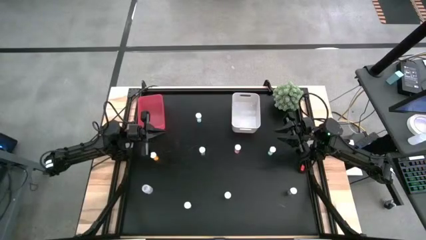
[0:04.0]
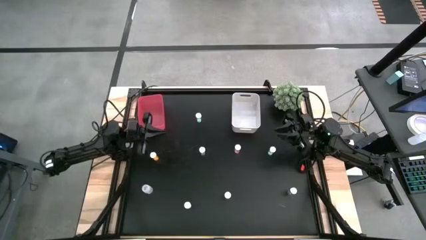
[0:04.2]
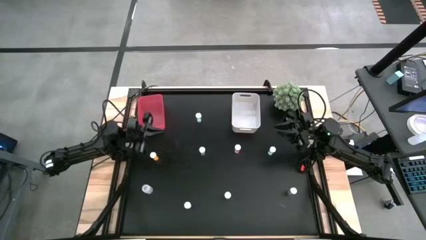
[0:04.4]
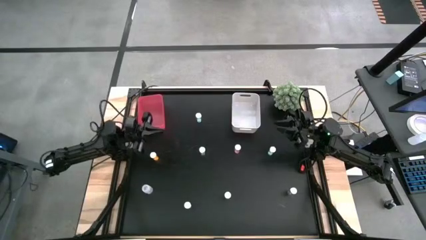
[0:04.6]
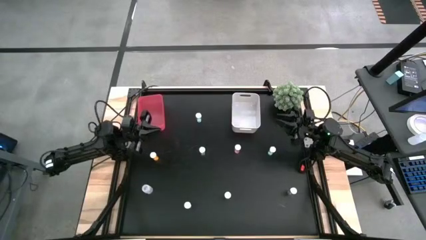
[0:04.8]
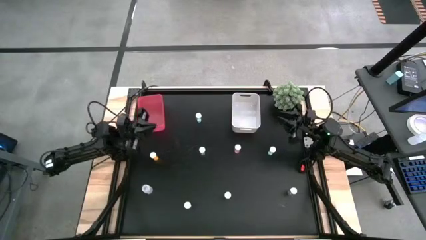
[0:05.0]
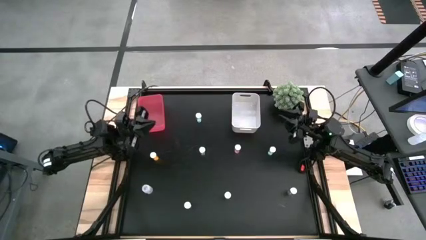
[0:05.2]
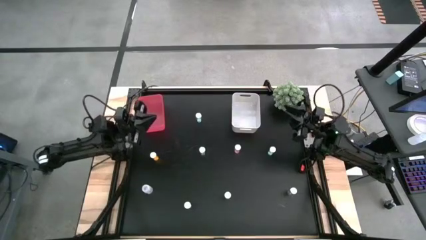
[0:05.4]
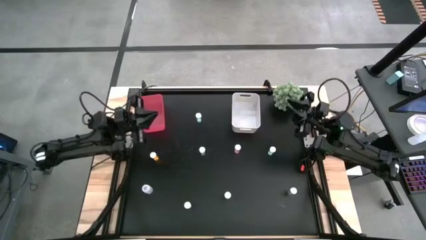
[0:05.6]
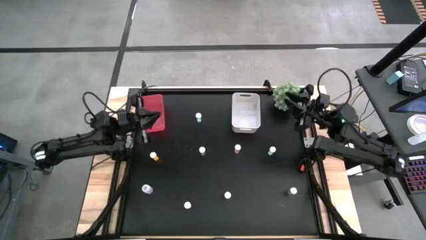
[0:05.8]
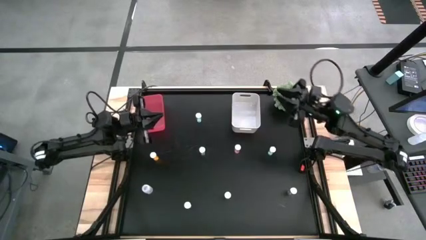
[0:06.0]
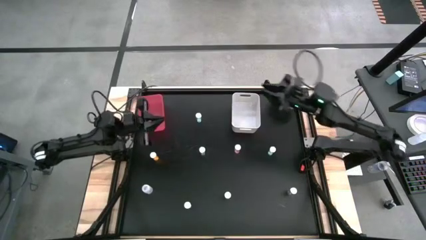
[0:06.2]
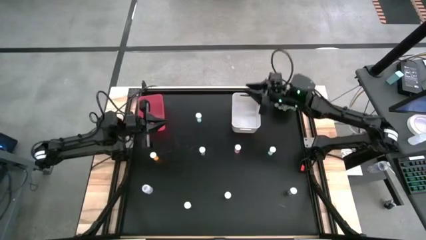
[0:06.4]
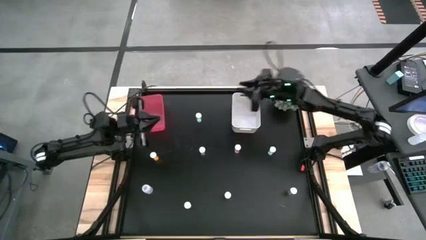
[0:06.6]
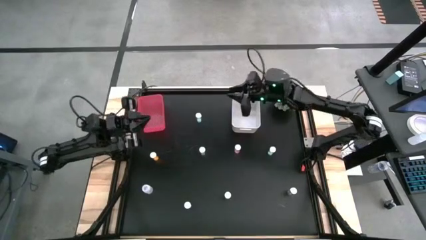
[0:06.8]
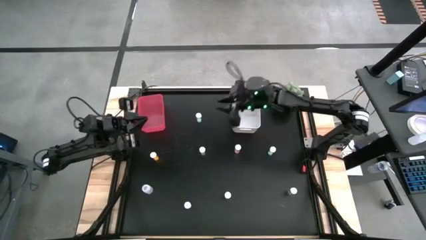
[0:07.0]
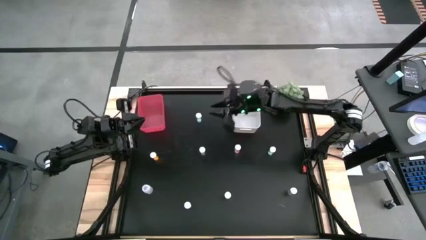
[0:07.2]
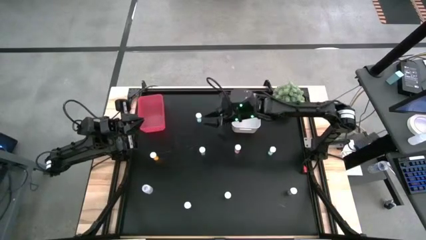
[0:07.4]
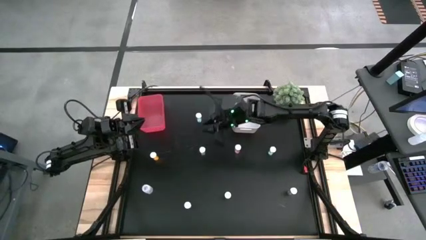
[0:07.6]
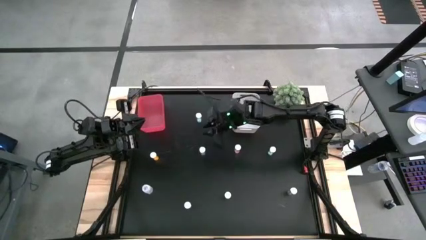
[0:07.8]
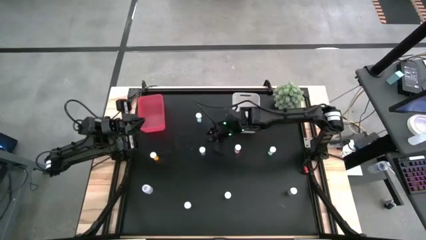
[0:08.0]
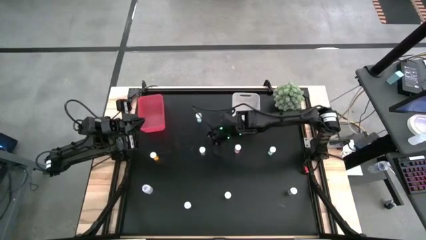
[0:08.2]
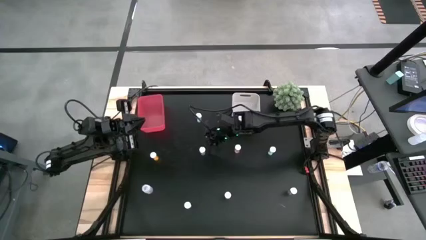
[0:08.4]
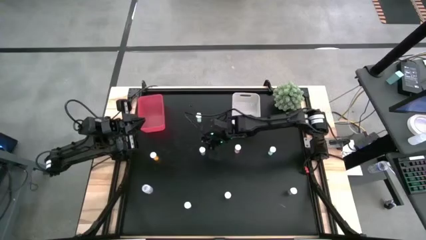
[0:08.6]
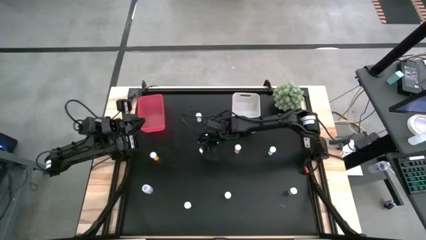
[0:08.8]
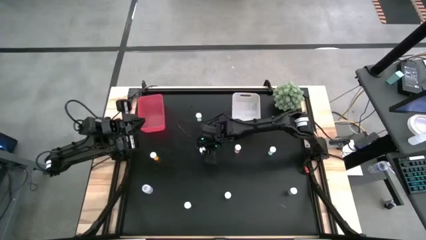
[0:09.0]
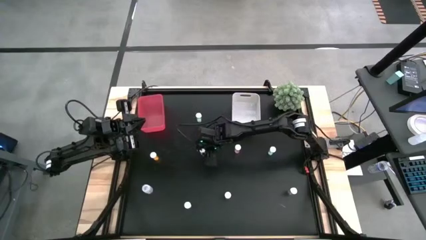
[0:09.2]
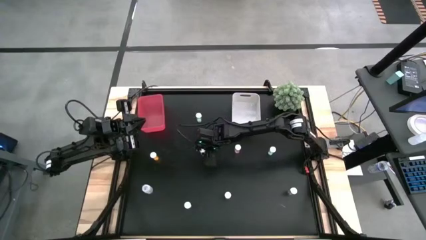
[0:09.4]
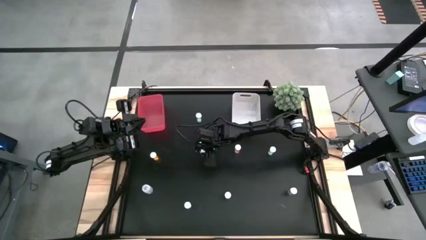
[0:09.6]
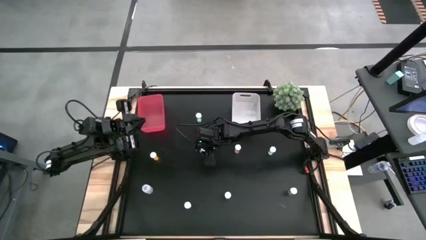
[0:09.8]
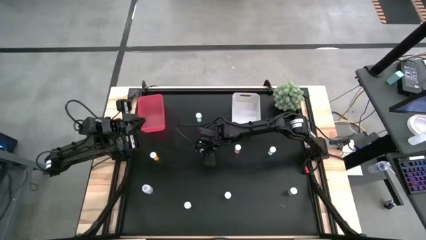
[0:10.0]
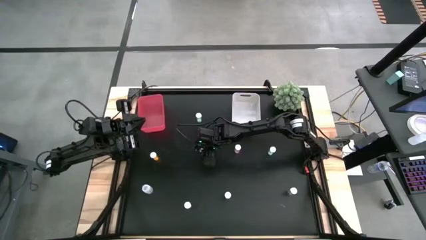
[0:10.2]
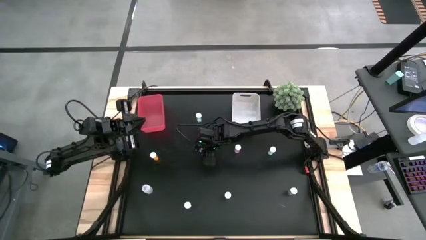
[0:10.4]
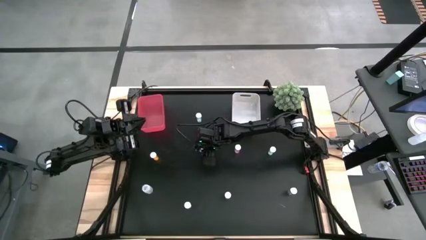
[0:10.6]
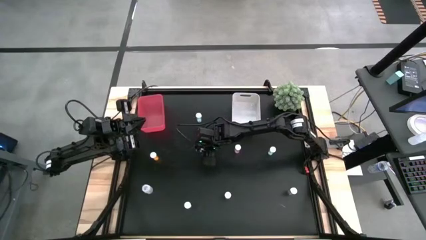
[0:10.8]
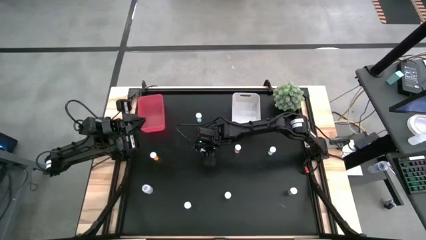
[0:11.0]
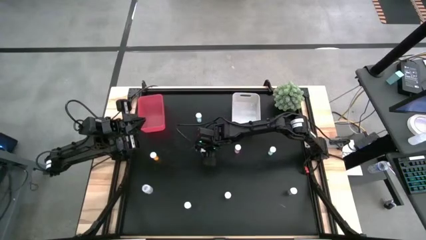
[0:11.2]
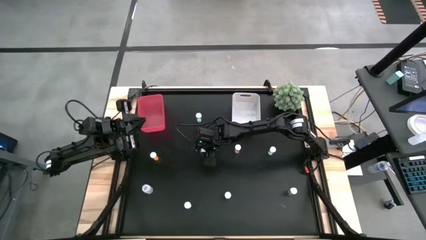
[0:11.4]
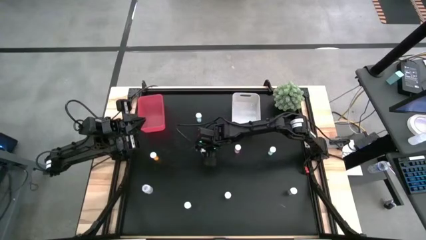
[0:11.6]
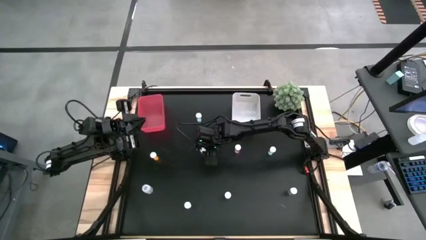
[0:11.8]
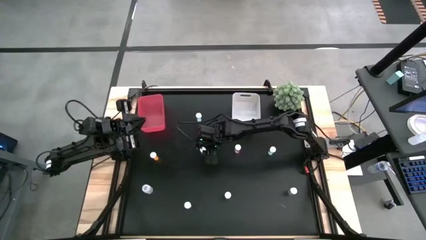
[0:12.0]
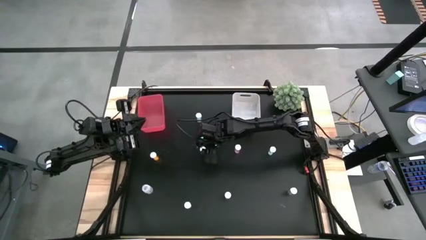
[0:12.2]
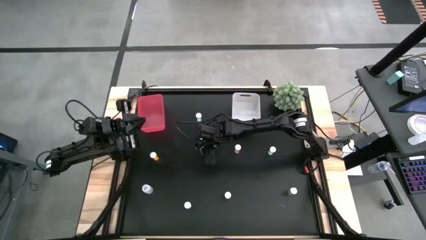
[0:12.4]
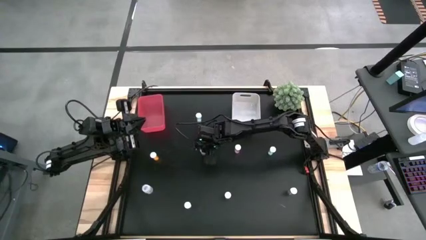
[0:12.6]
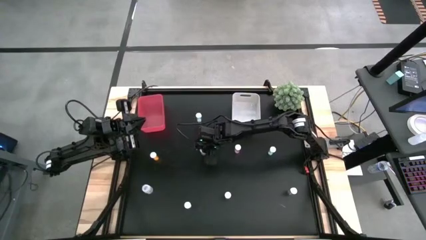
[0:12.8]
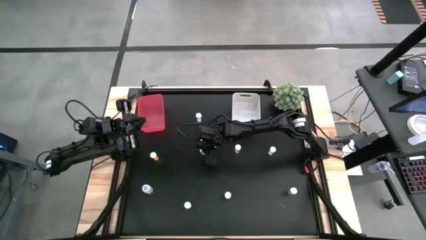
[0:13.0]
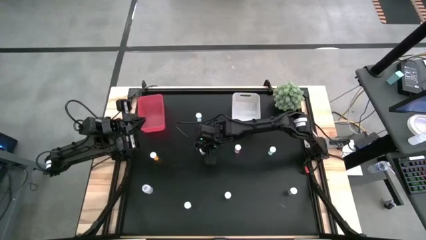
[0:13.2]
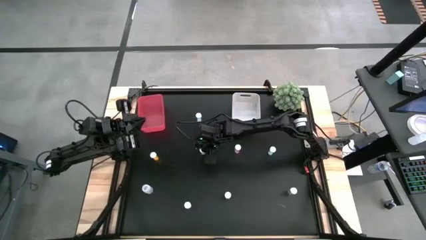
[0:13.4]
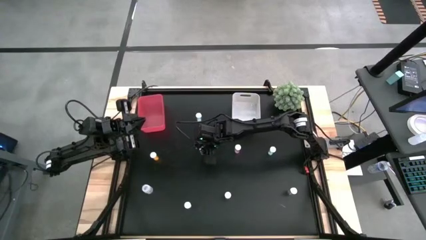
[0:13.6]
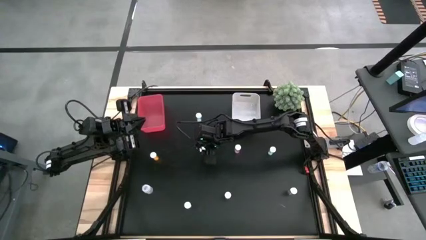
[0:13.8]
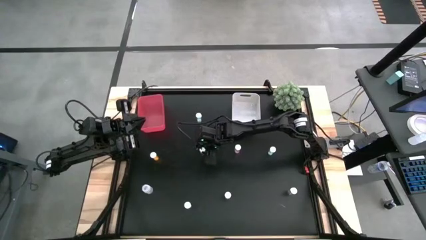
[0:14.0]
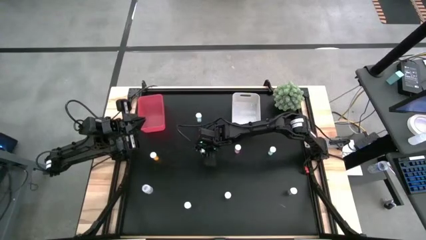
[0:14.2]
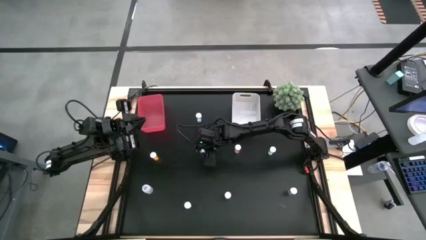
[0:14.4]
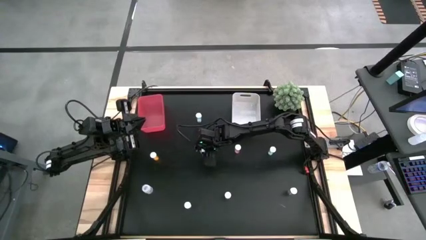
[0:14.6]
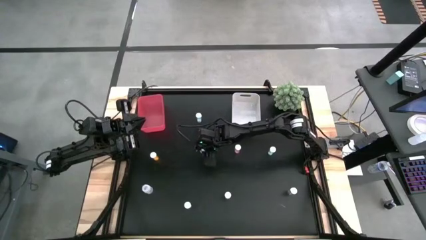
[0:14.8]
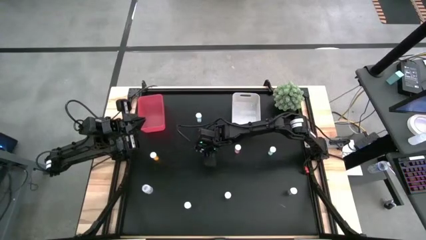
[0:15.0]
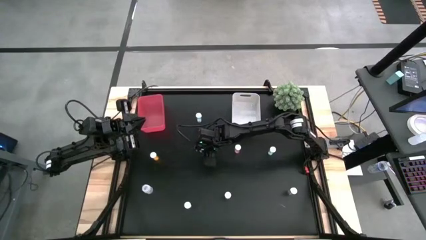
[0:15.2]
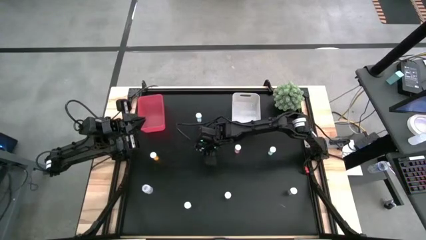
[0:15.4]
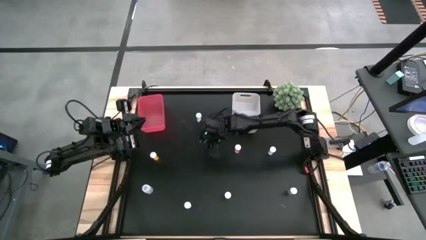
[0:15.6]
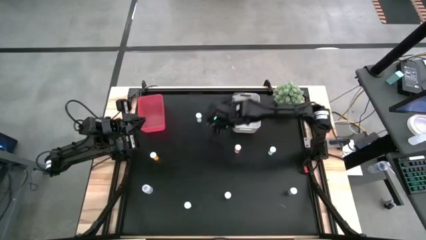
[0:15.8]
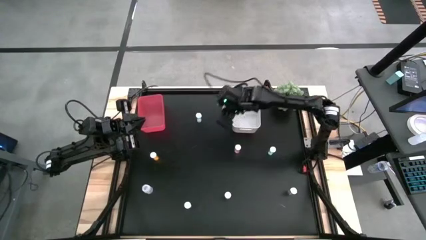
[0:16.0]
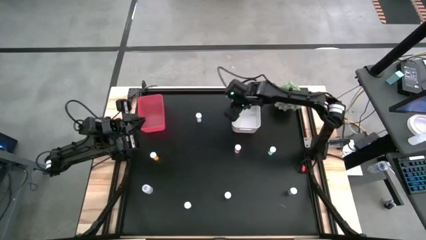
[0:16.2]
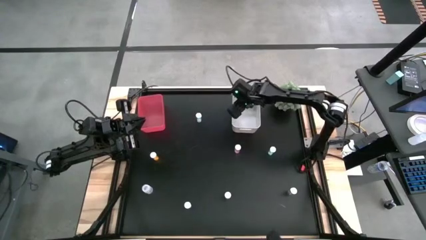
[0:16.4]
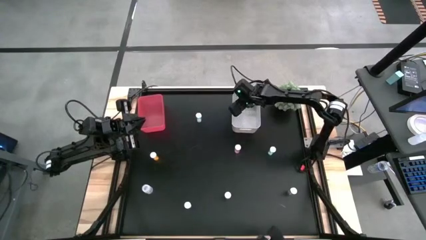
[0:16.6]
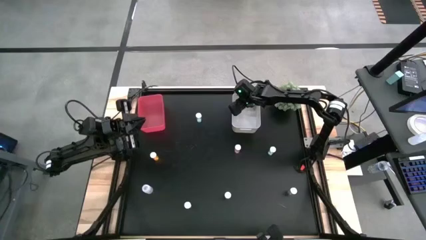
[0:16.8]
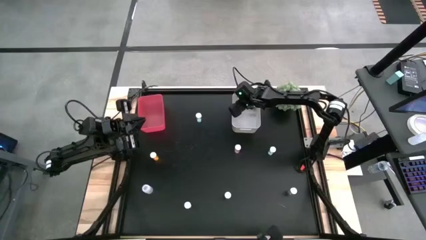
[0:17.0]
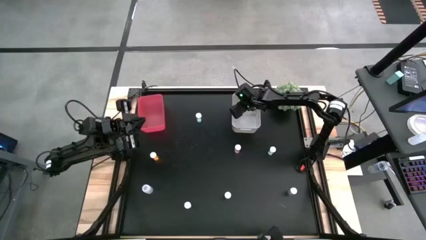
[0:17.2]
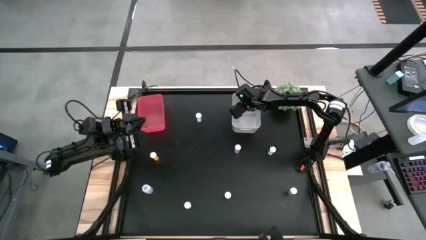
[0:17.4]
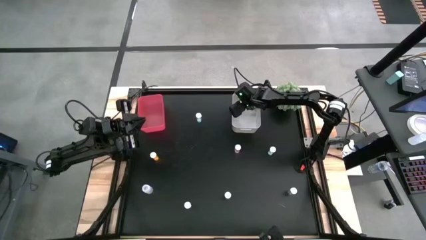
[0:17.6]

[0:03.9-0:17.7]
Task: Pick and place medicine bottles into bin by pill shape (circle, oval)
Put the blue capsule bottle into the white bin

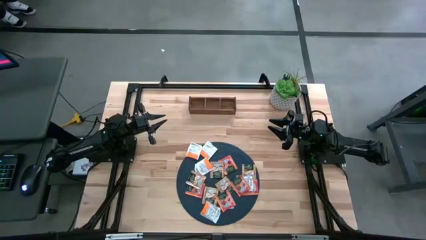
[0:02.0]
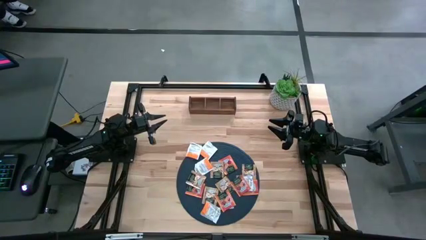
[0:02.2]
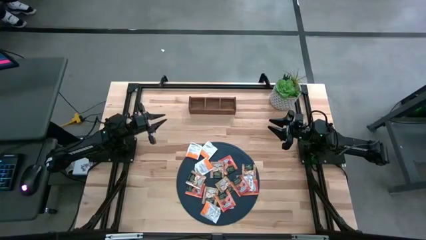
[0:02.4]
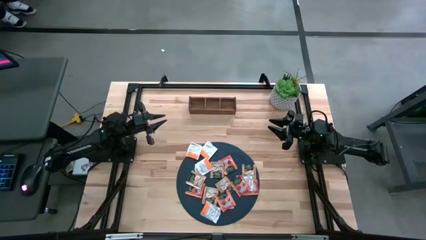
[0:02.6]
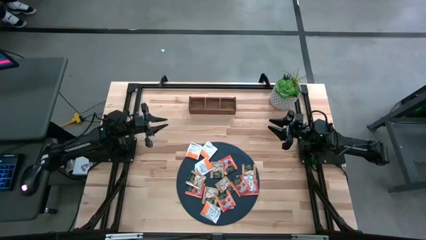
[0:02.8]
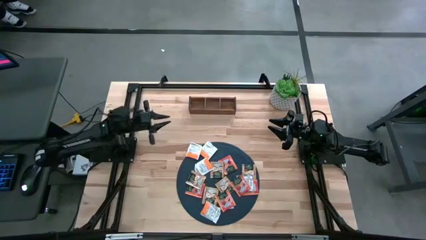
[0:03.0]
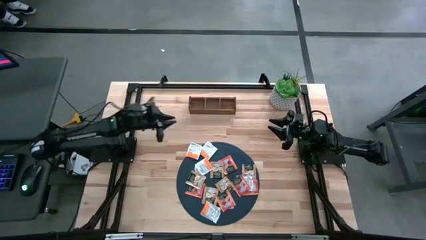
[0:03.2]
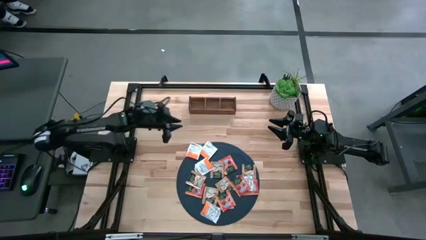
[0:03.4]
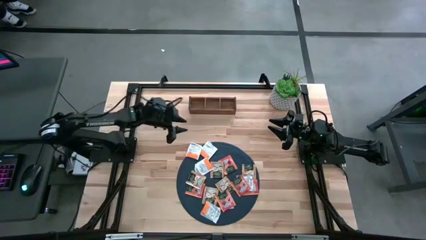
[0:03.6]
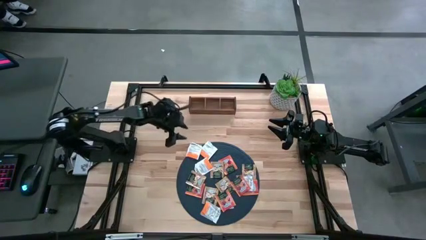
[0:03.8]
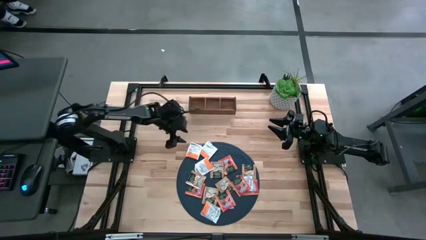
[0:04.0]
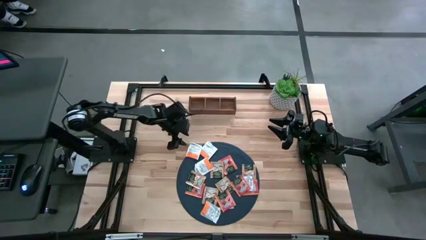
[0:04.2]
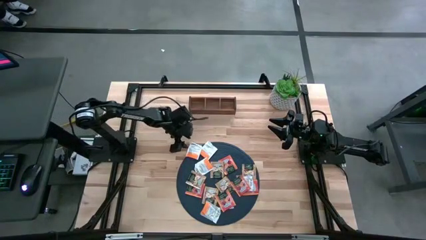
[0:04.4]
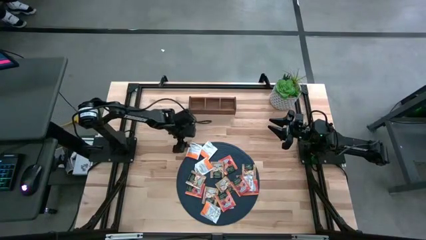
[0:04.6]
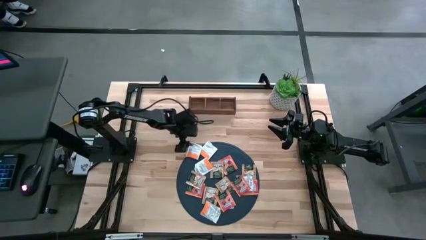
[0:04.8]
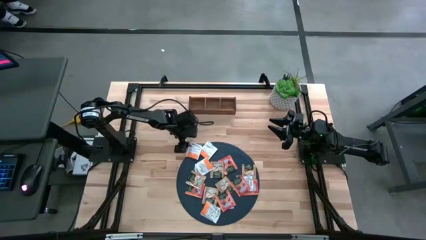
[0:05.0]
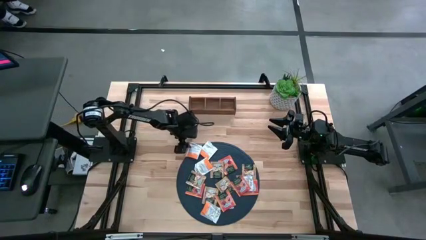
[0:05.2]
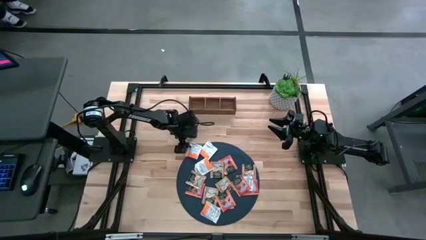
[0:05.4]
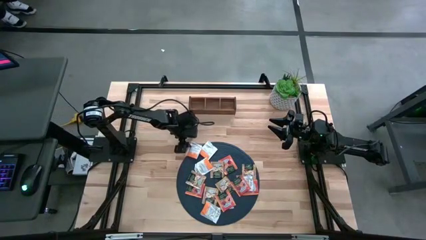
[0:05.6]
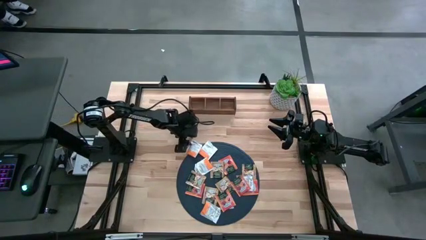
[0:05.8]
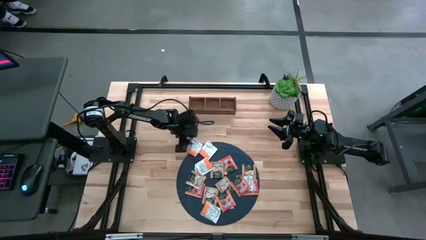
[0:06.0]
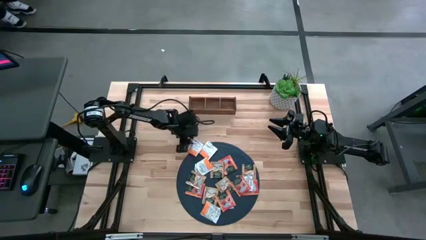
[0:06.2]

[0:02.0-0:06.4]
Task: Pick & Place Tea
Put the white tea bag into the left section of the wooden organizer
